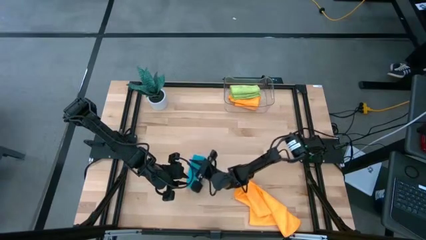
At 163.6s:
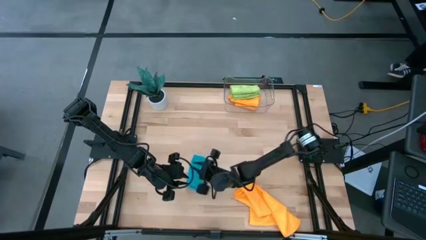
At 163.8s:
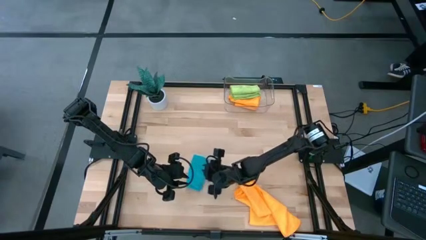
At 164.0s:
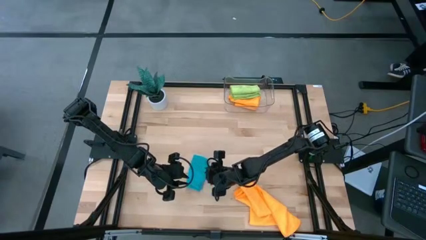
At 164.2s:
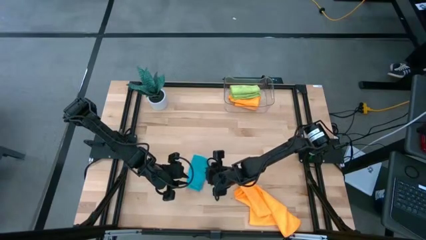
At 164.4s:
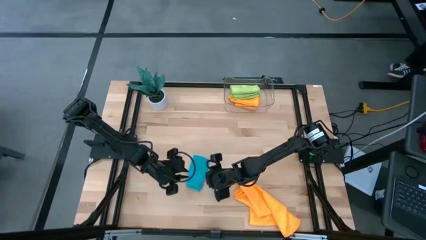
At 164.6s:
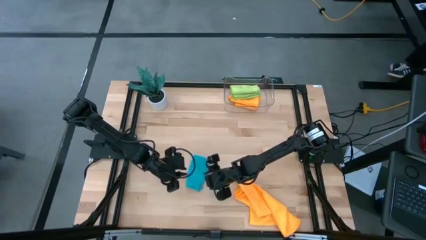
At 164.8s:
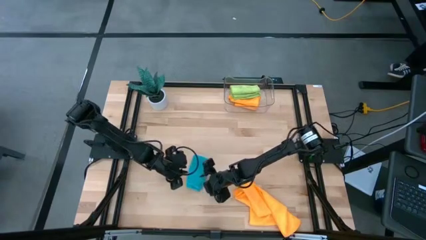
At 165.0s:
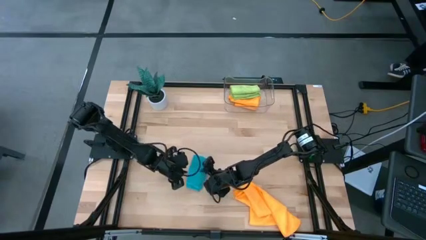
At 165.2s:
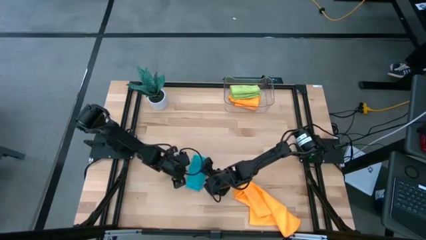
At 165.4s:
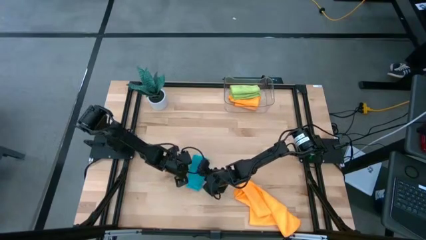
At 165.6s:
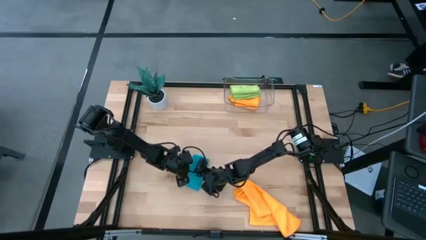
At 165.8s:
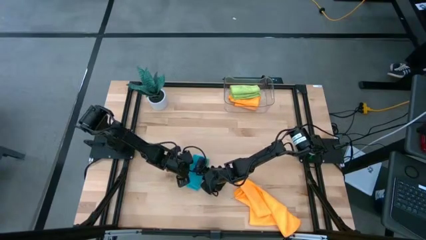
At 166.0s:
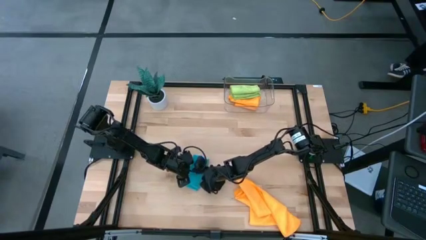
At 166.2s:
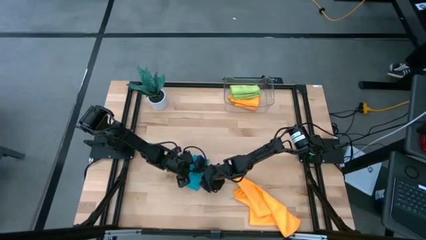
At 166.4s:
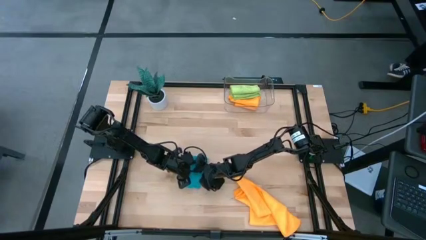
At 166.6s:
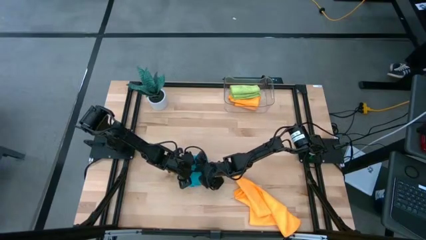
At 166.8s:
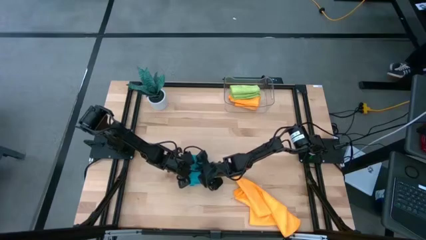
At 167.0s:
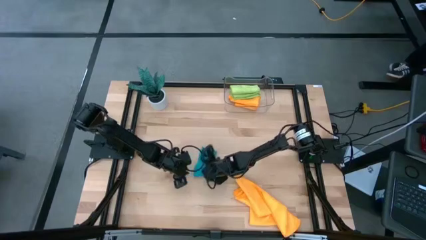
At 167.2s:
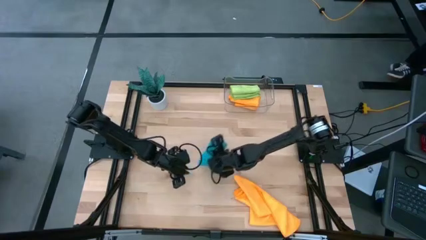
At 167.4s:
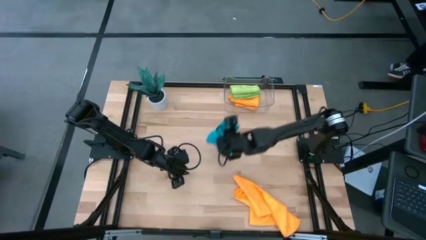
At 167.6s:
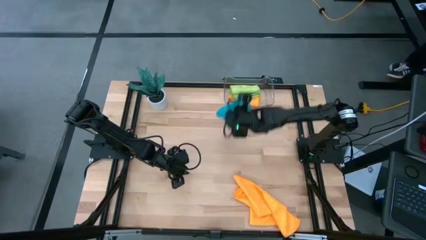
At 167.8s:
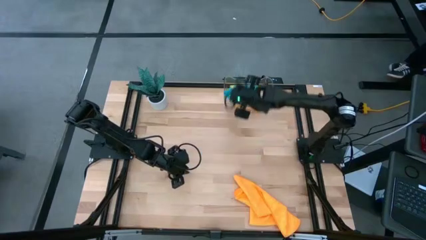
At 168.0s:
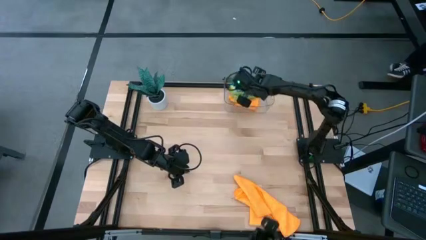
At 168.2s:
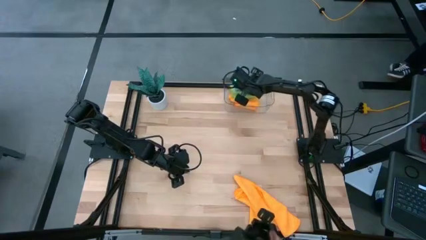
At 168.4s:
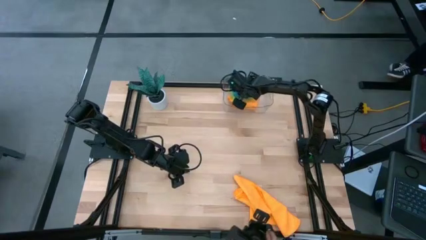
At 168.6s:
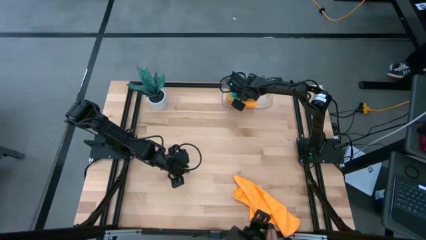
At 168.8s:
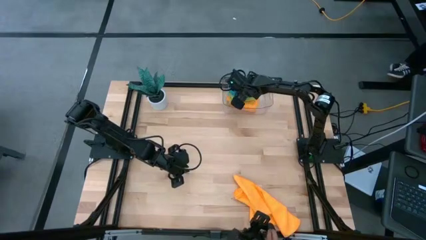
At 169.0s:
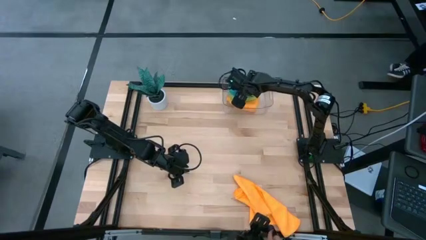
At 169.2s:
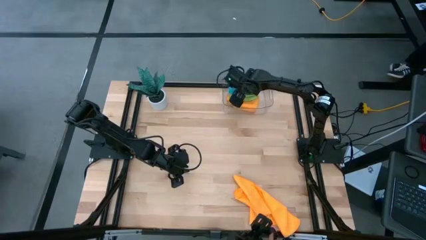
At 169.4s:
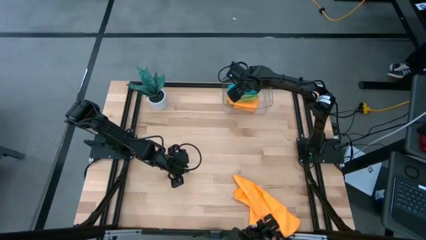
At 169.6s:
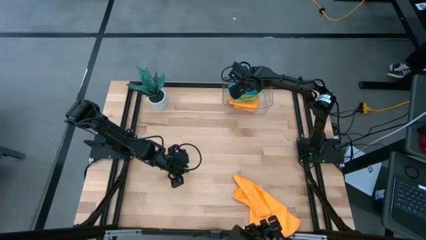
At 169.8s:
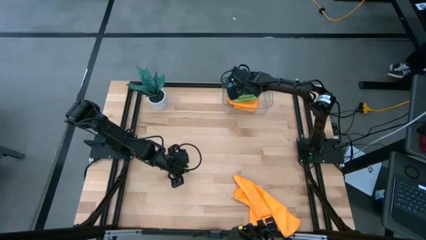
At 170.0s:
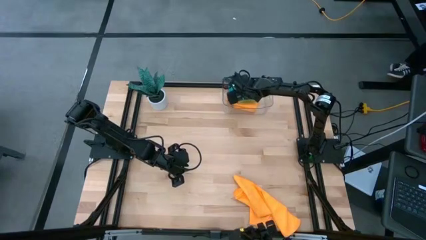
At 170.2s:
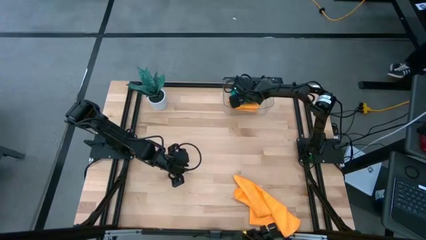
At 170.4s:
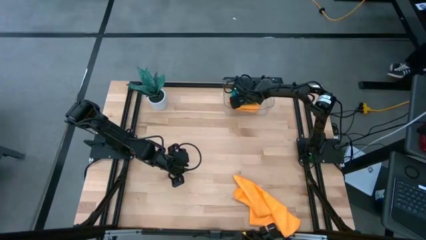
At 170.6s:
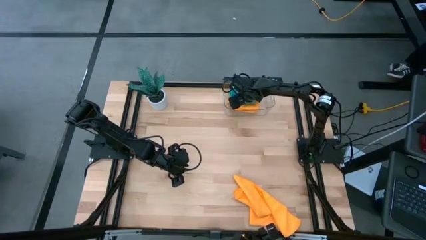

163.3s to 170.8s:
Task: Fold microfiber towels
Put the folded blue microfiber towel into the transparent bin

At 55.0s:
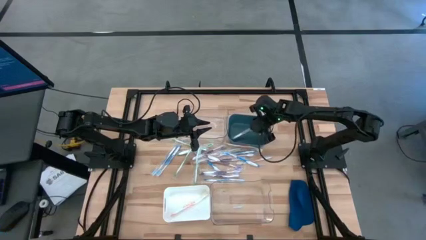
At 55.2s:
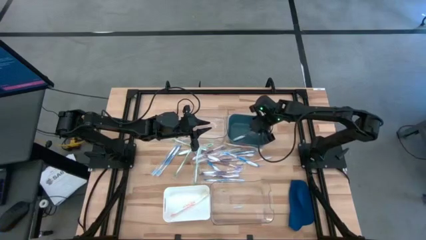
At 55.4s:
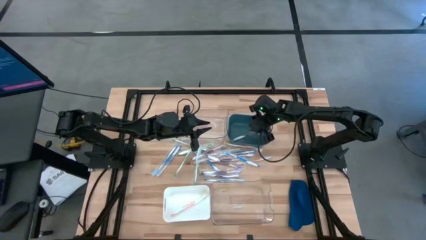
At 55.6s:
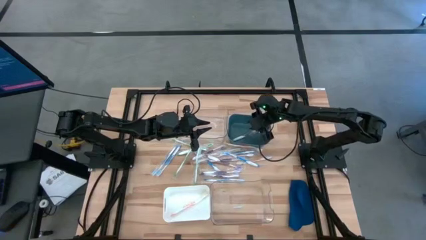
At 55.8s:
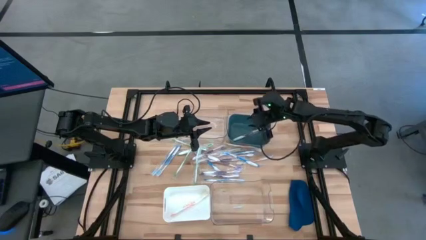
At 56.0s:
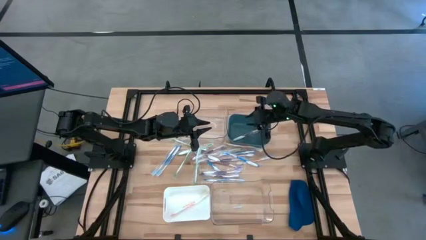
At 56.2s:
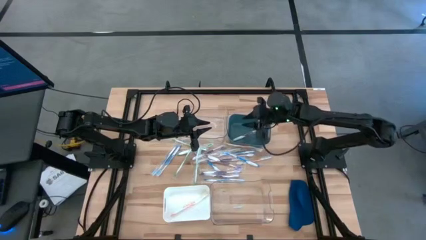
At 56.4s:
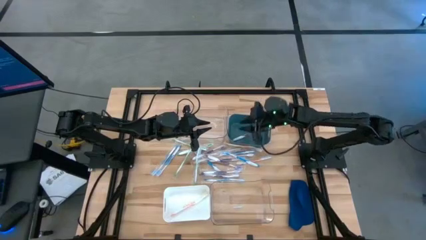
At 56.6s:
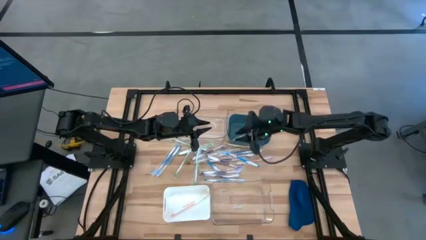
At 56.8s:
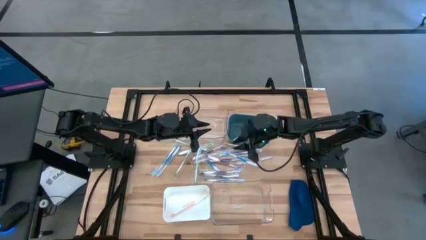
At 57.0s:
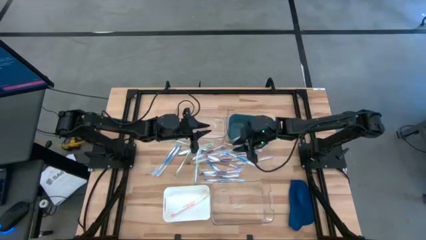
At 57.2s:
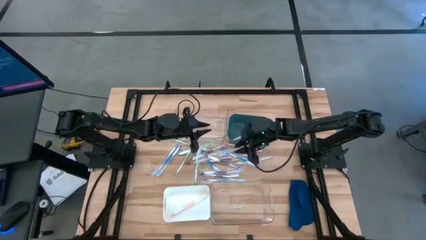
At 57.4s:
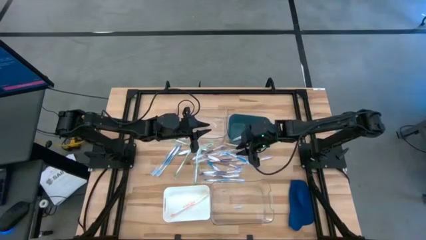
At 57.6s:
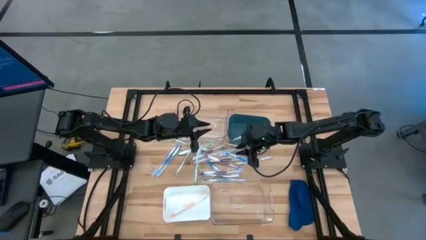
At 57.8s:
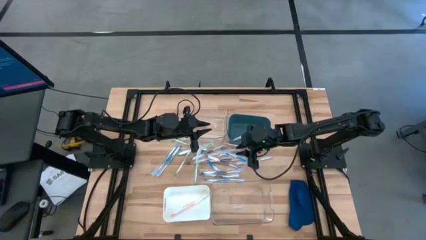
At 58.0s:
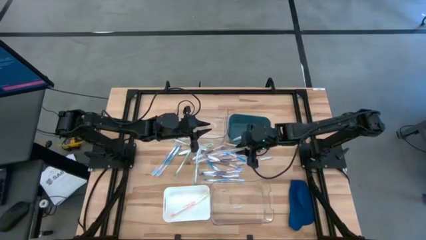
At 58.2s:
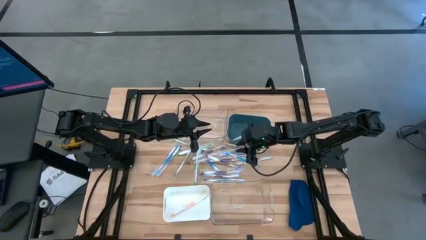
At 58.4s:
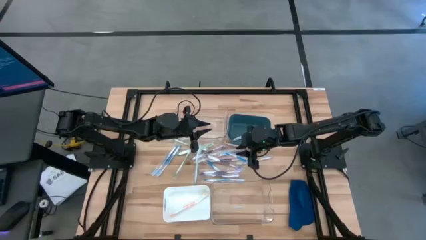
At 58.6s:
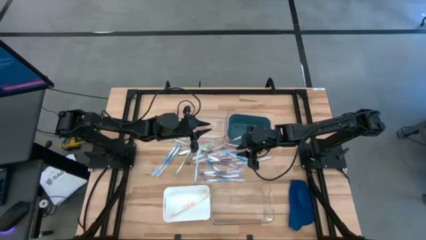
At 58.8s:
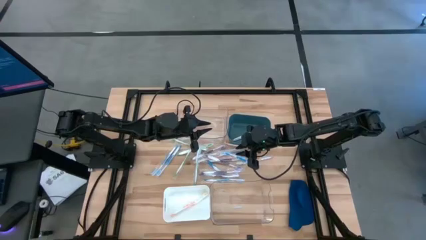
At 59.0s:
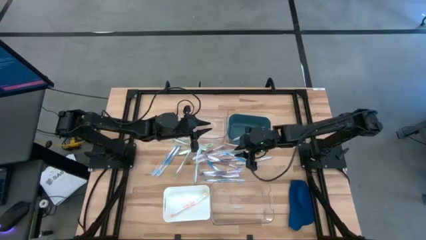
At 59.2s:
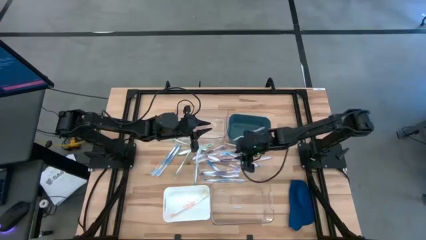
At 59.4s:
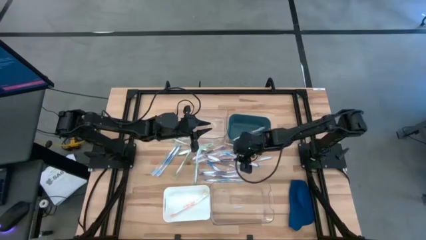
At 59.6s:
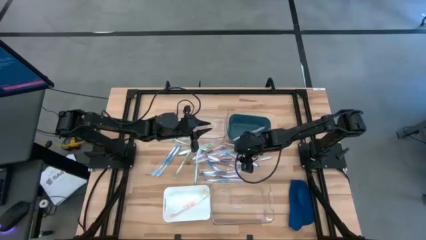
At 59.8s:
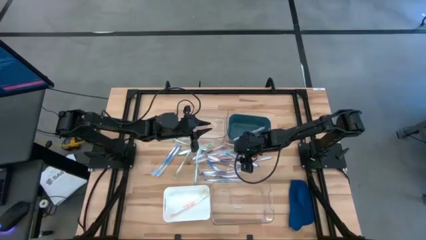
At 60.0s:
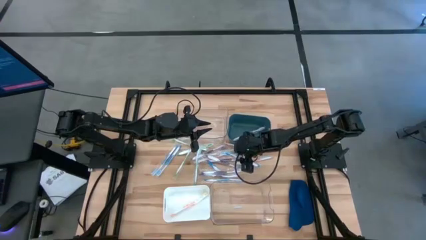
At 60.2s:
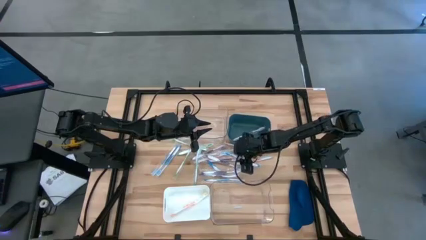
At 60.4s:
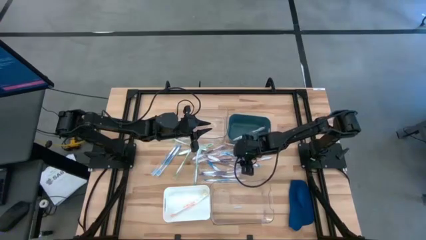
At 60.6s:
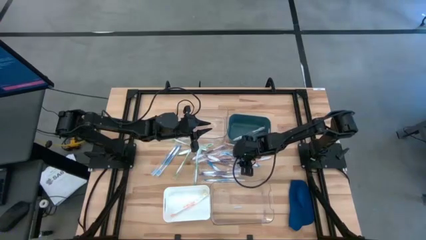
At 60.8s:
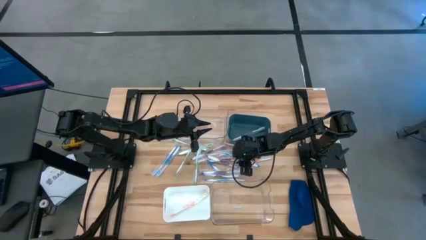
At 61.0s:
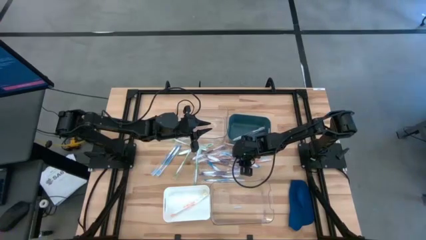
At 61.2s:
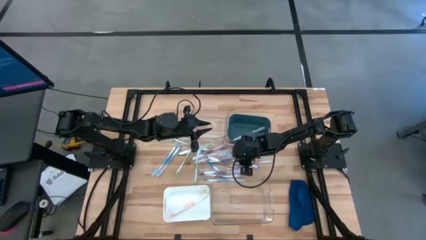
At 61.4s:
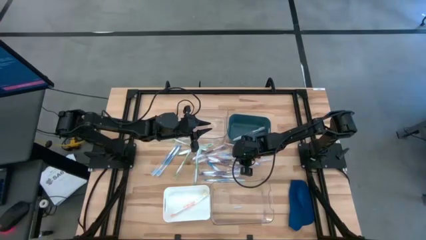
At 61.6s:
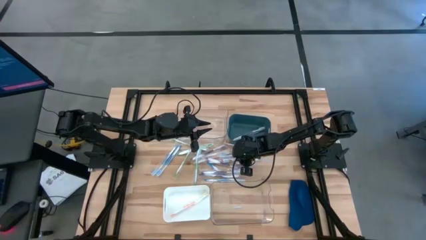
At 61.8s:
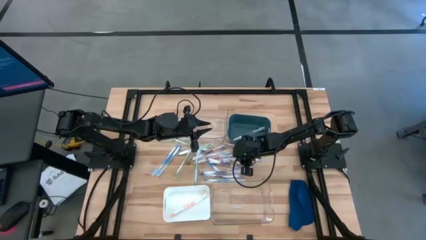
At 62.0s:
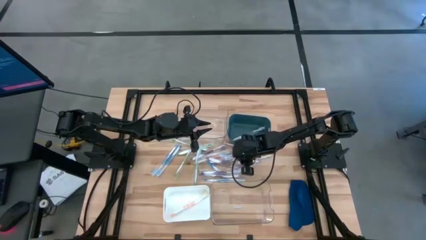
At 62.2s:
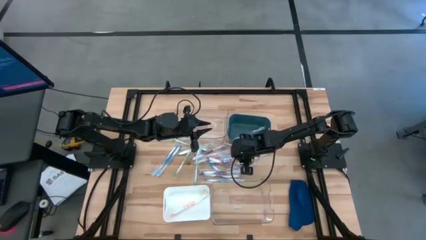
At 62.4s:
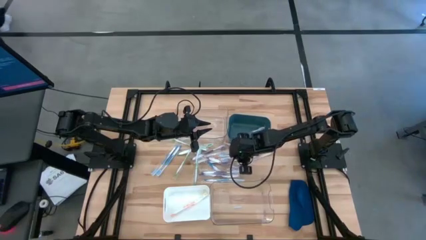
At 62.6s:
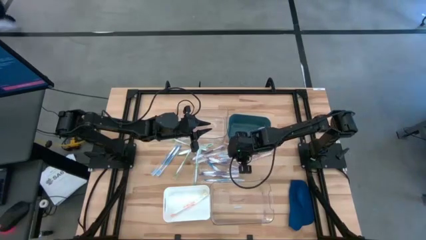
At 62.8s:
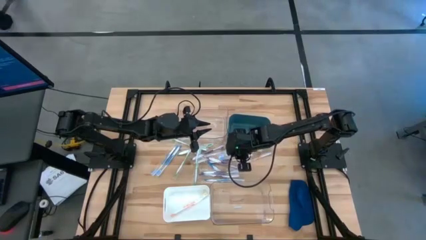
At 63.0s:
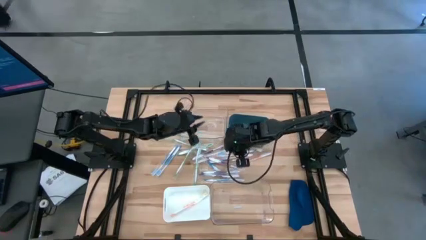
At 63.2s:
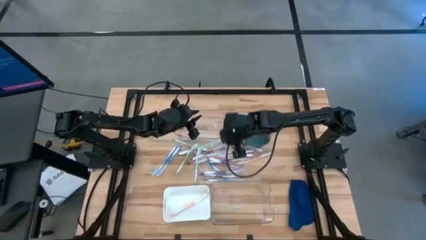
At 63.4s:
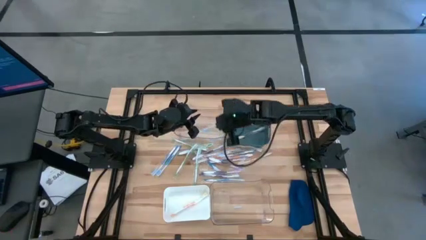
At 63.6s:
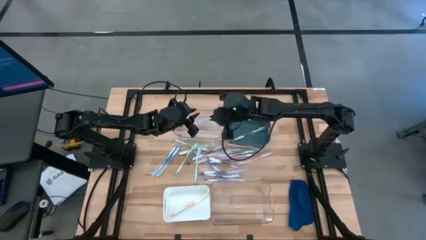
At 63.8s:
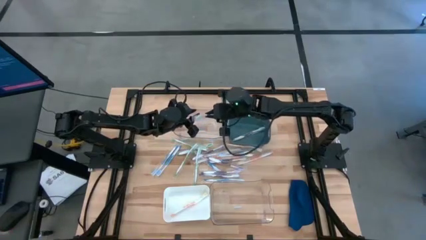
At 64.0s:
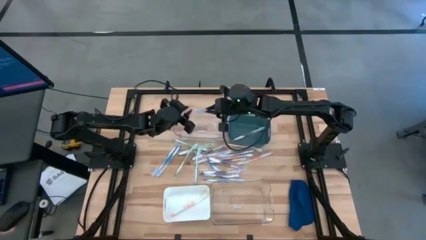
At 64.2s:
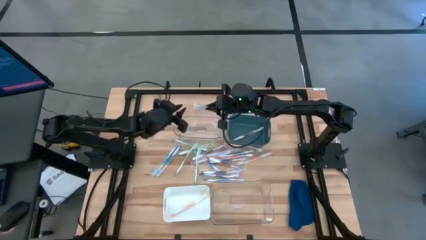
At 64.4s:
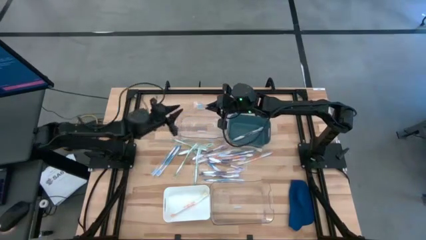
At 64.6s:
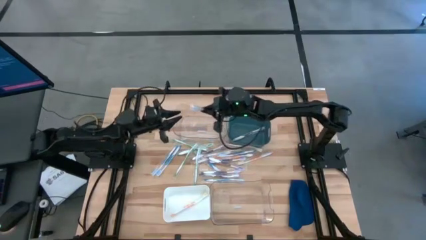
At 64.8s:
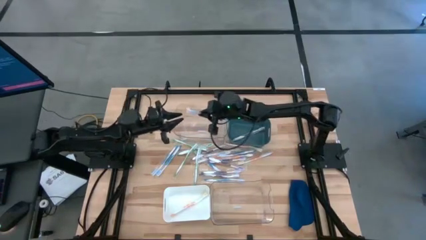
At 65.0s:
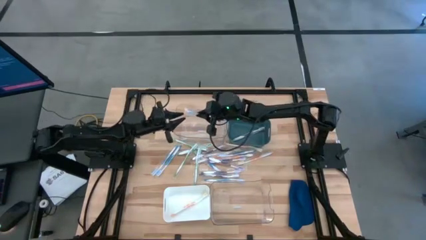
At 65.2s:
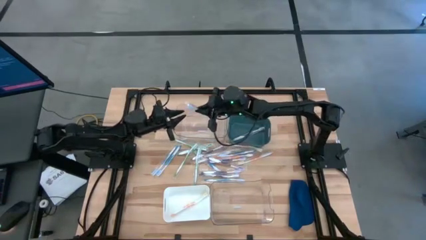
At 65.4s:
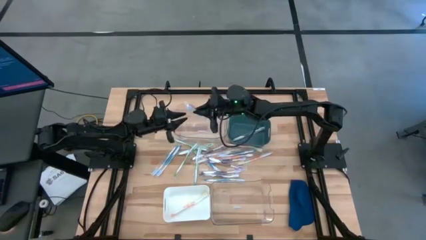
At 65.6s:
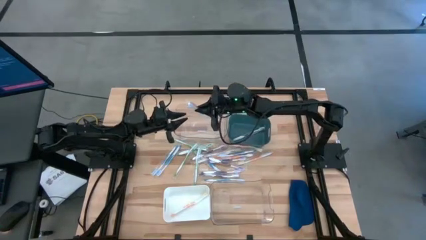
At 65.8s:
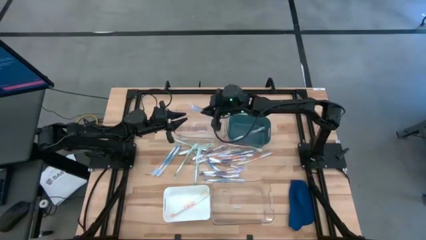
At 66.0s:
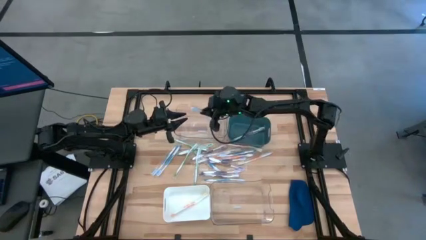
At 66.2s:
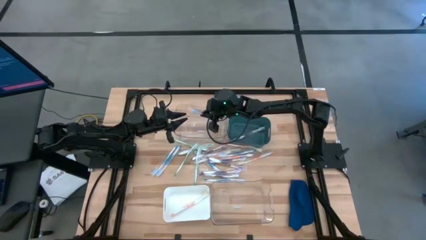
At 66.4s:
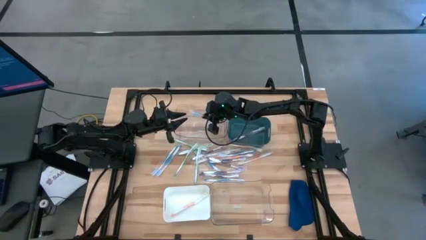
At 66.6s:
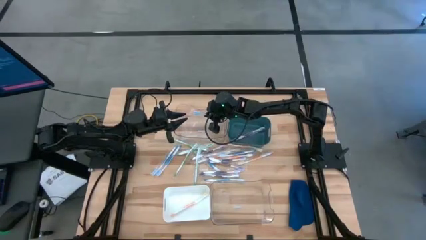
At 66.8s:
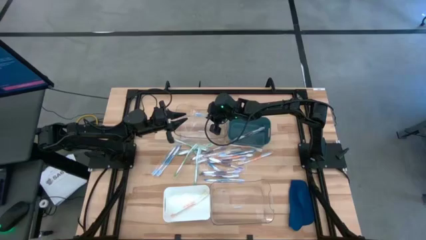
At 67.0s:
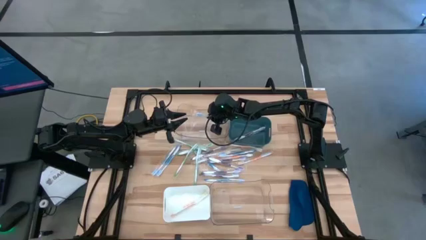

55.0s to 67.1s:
Task: Pick & Place Toothbrushes
Put the blue toothbrush into the top transparent bin
